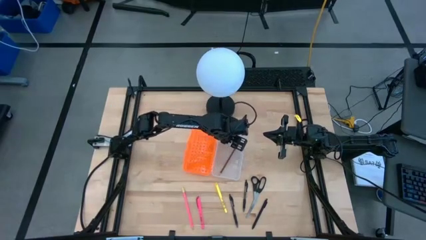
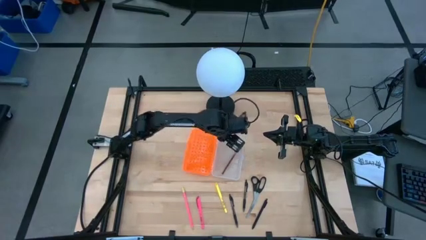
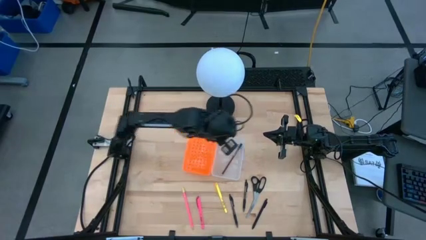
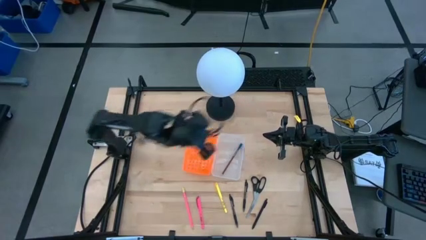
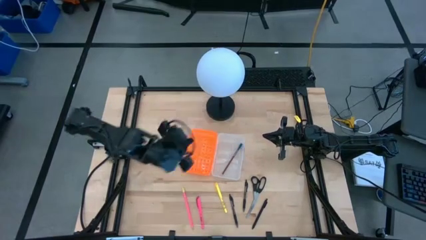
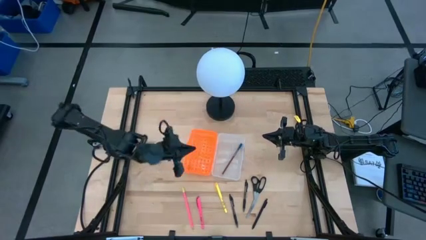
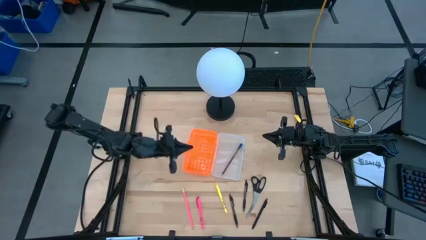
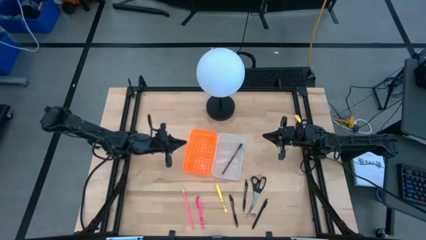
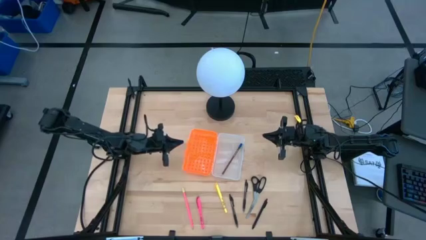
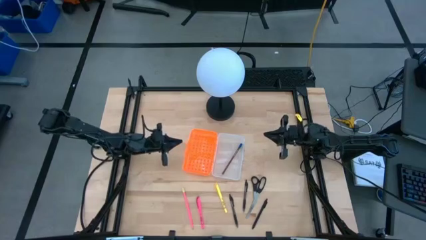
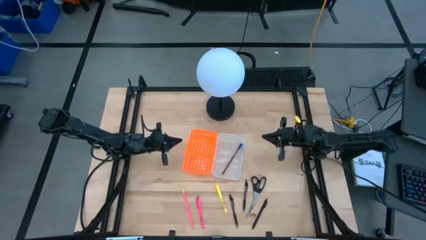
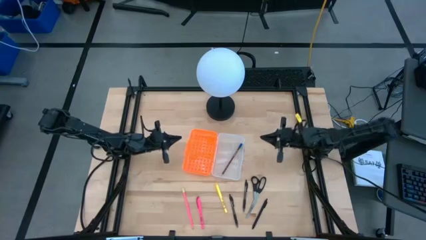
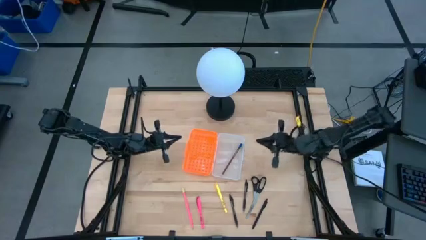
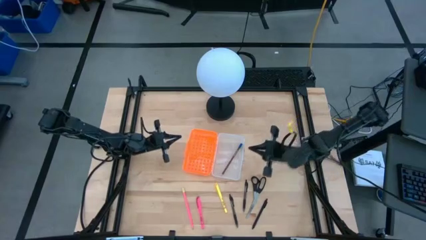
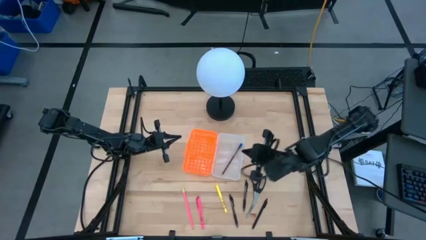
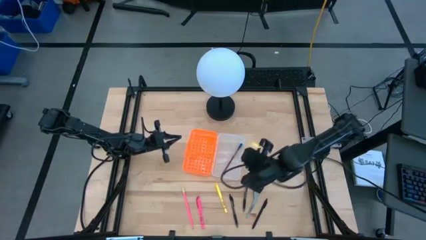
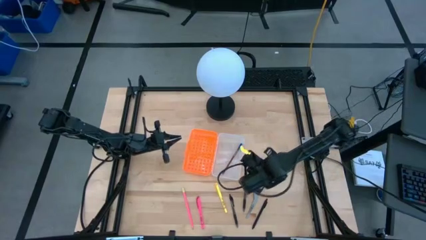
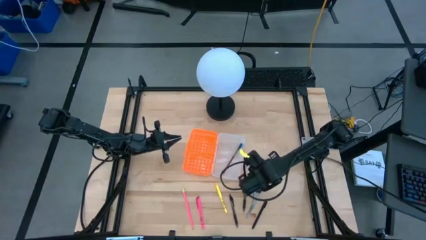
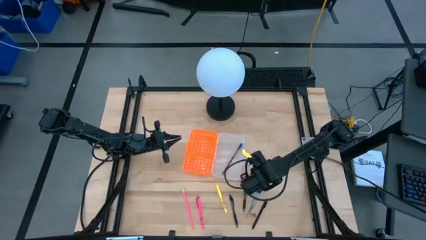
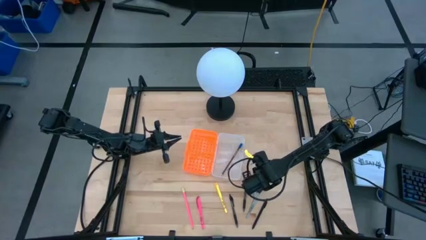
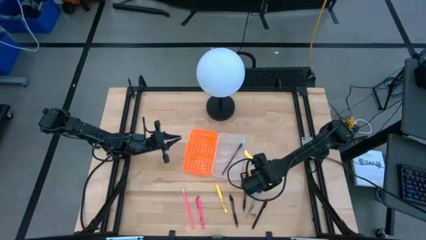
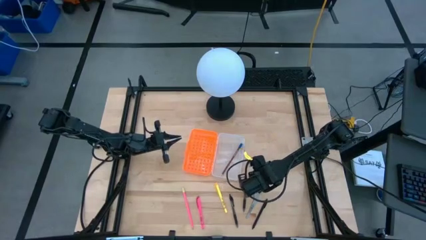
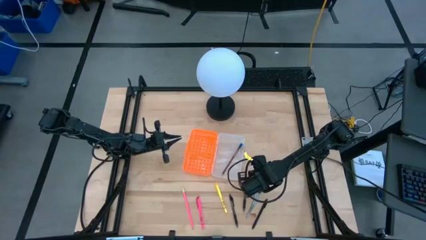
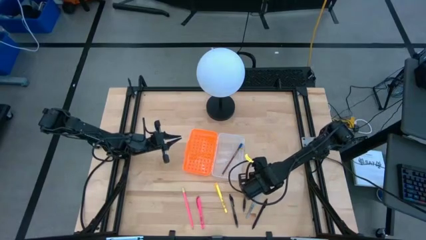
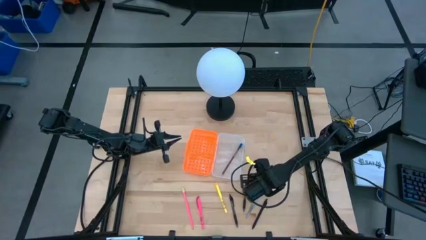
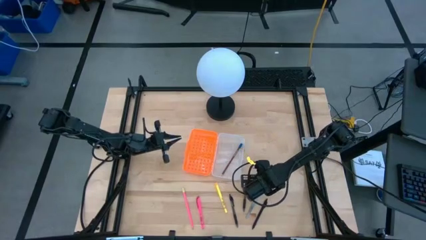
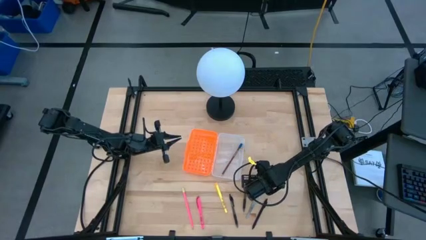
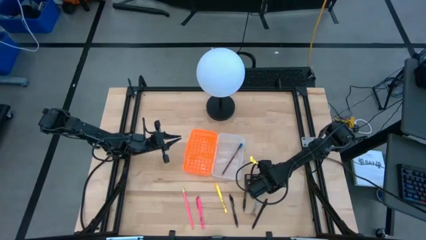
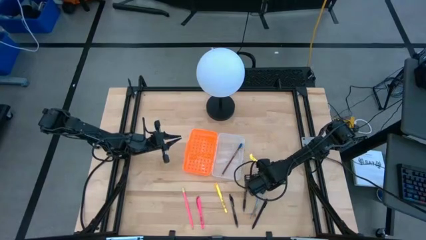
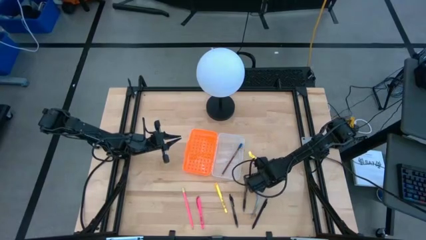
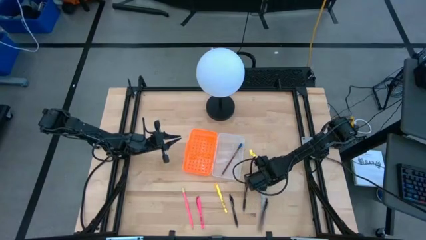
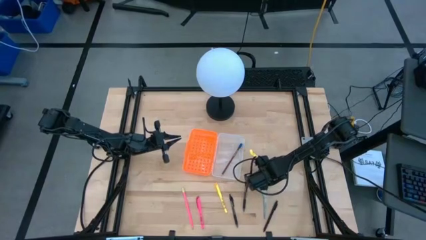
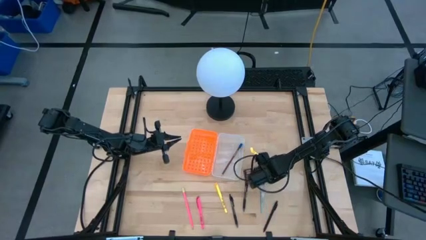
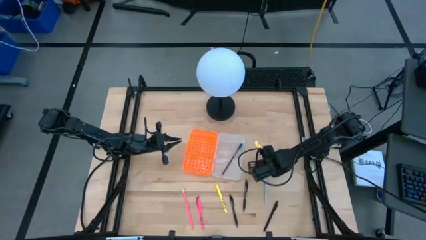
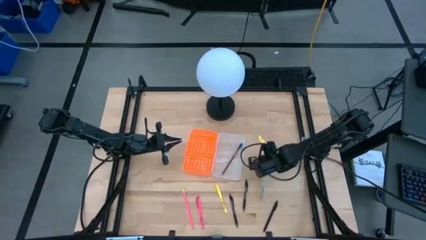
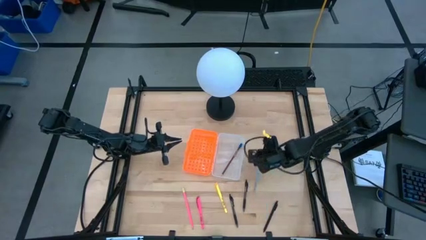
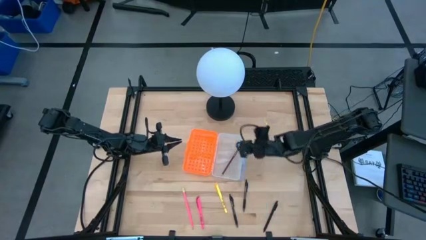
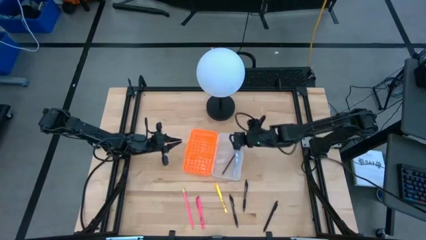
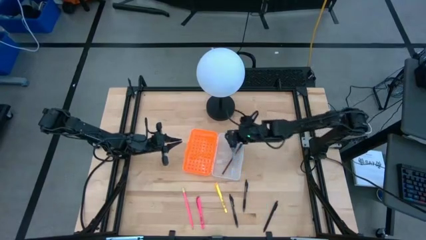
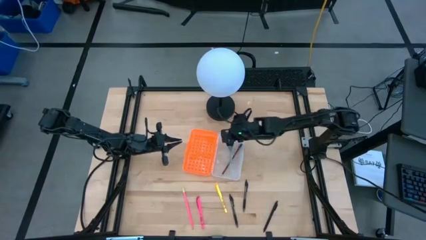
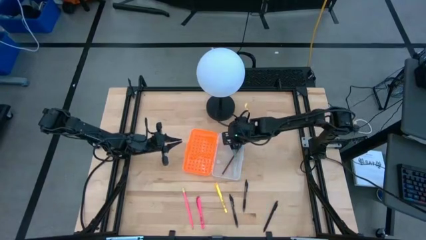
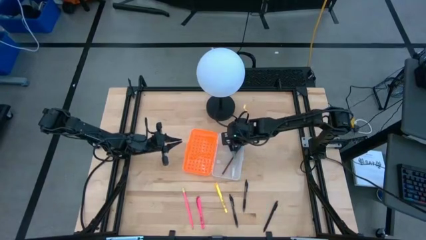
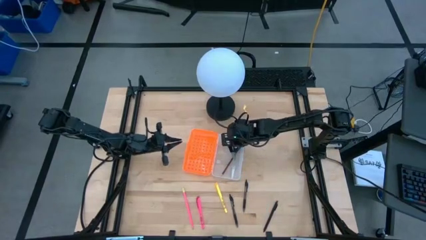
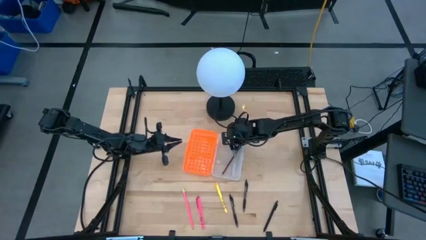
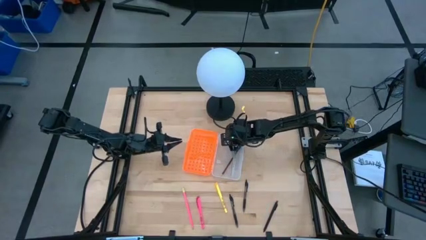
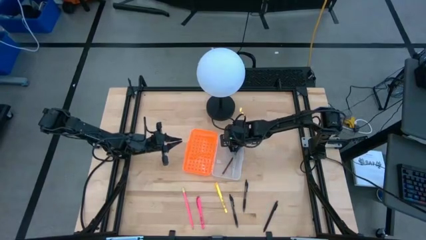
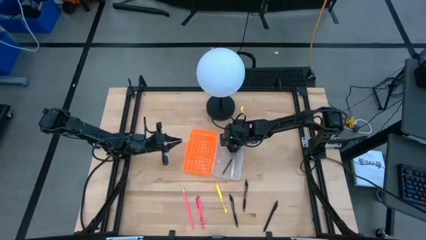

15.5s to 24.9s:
Task: Pick & place school supplies into a supply box
Put the scissors into the white pencil box

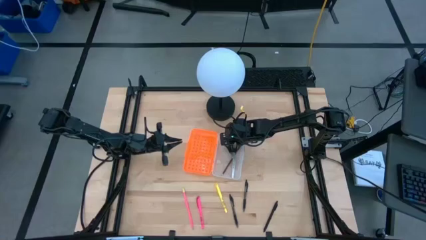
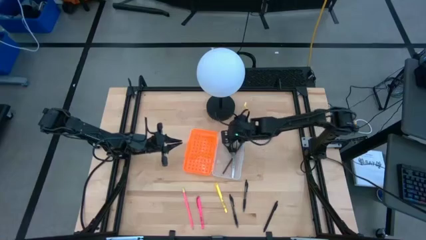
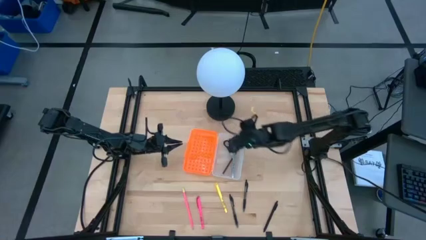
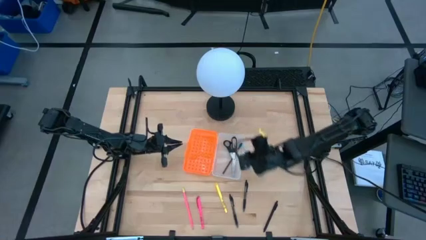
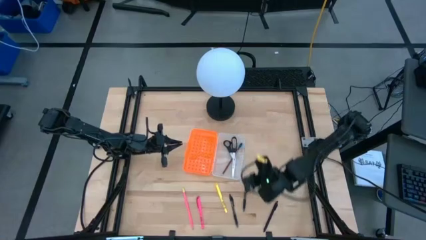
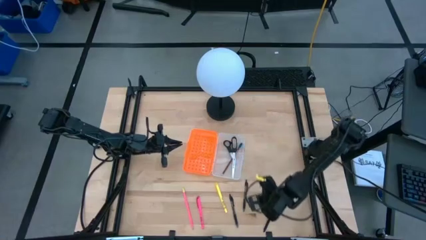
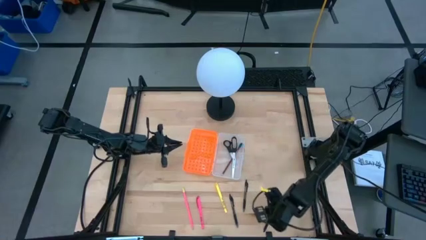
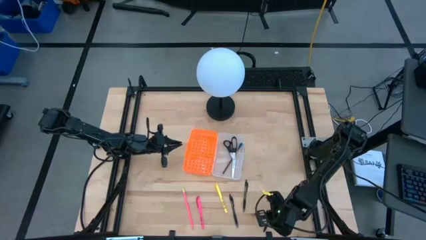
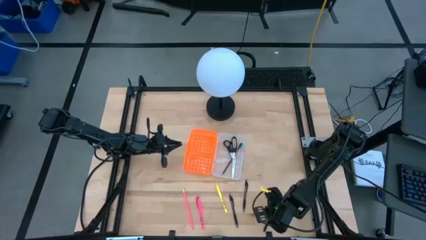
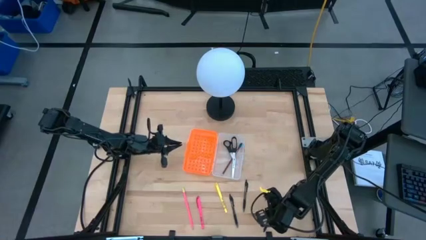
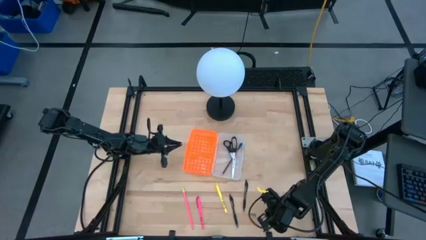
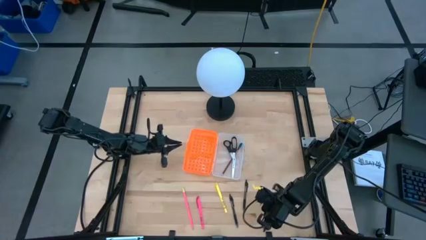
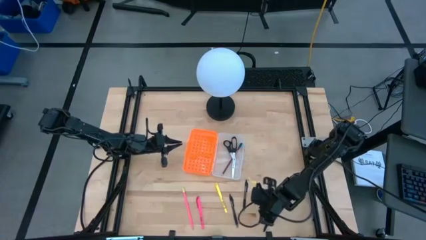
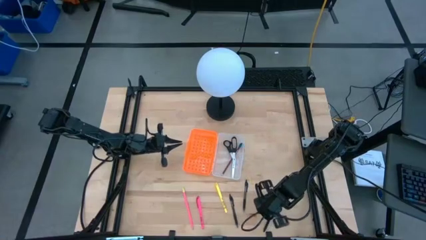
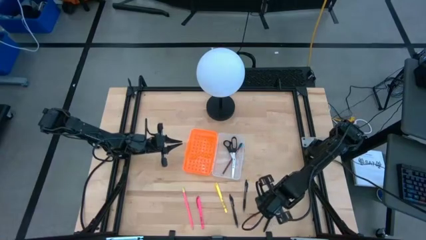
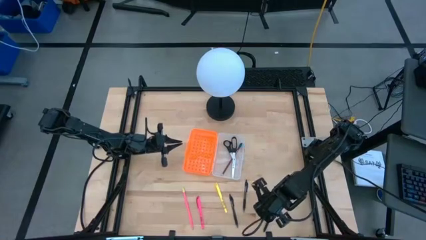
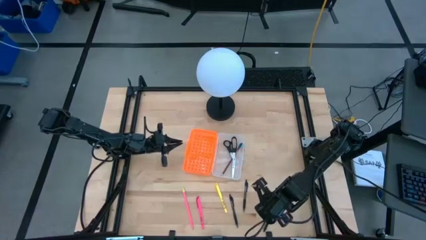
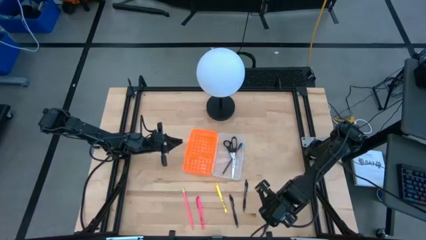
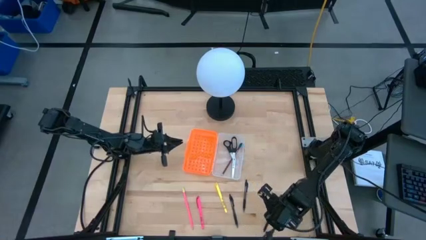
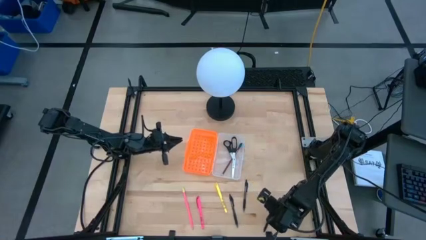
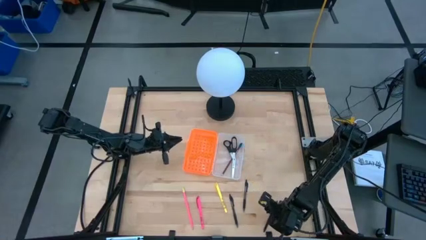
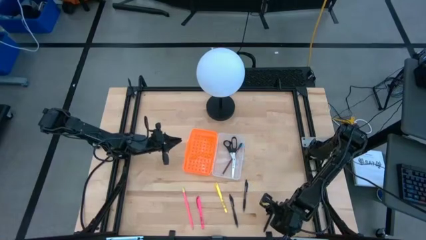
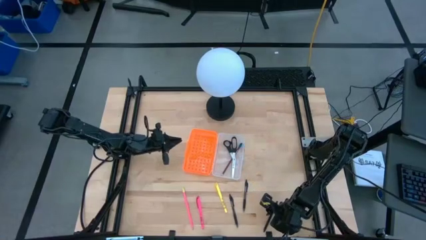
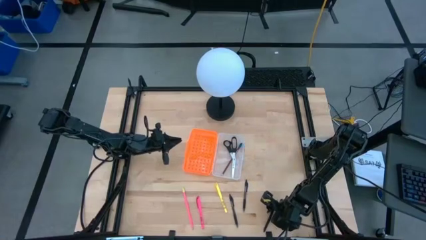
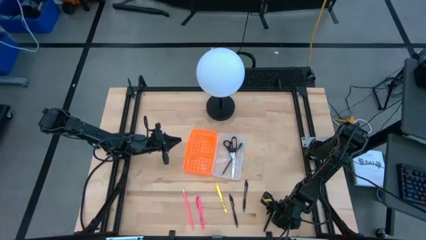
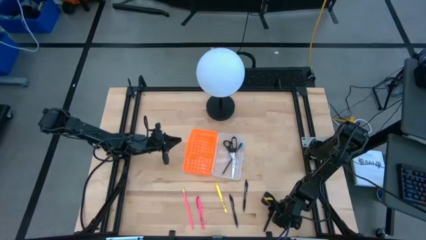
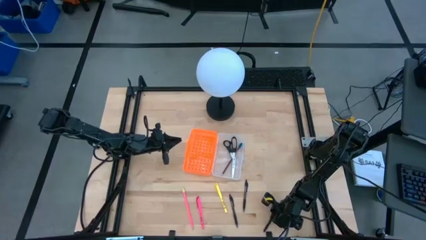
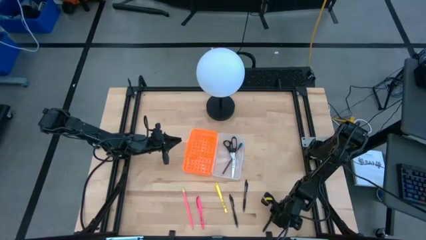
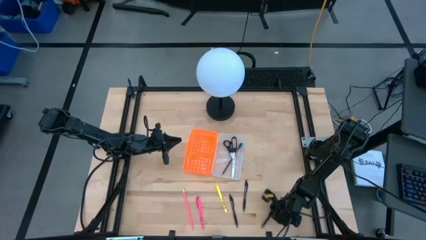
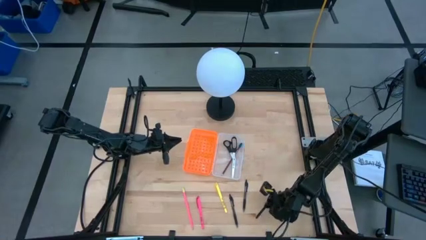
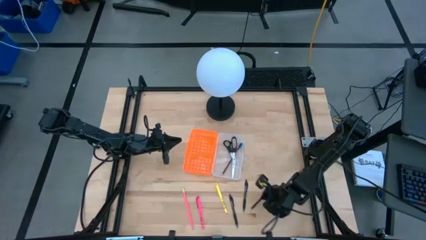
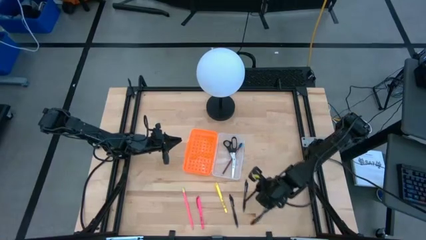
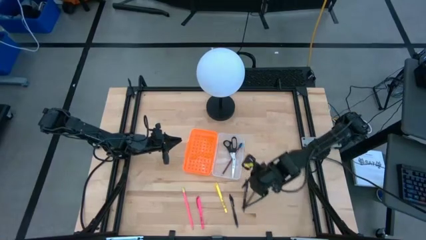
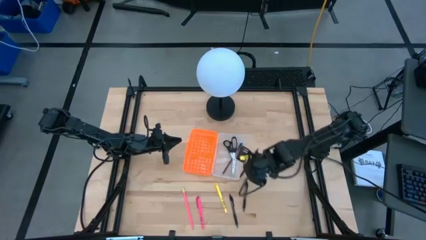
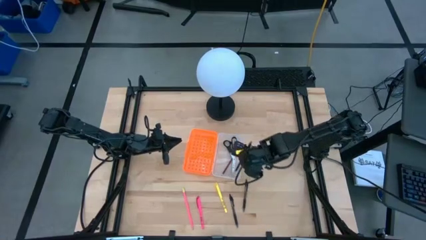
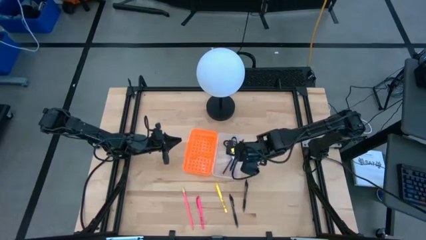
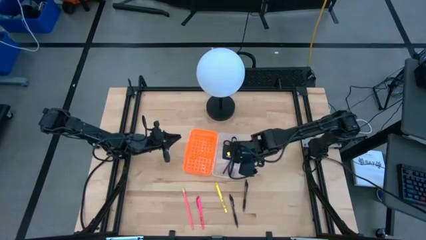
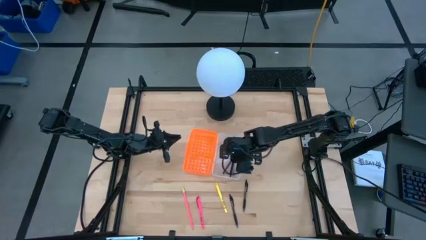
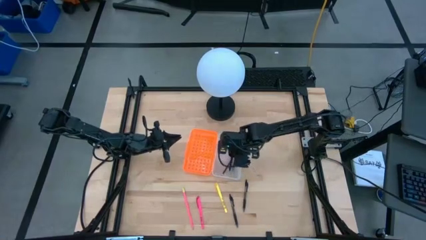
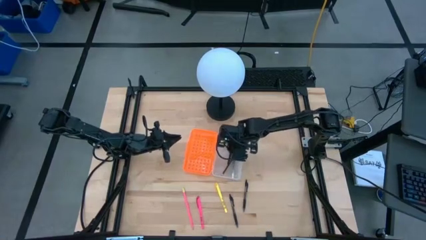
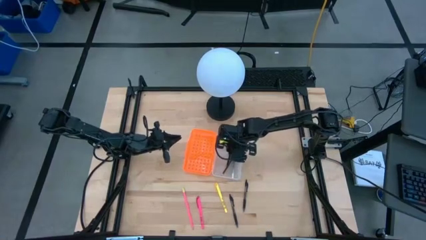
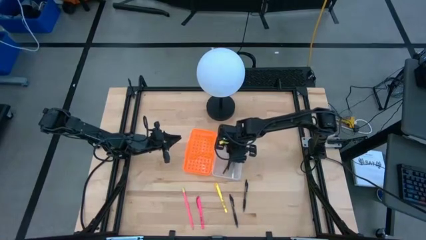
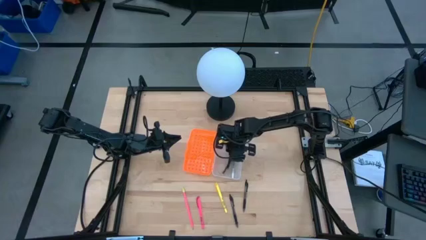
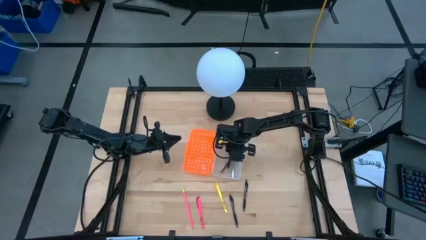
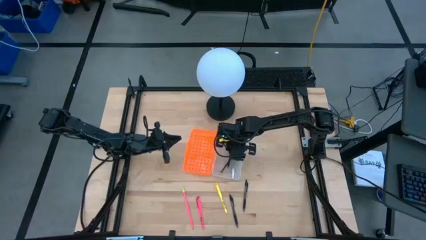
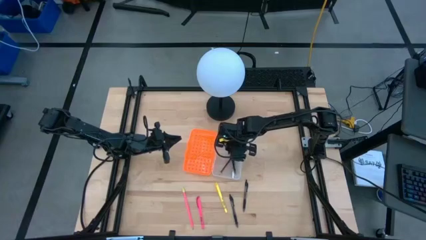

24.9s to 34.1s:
Put the right black pen into the pencil box
